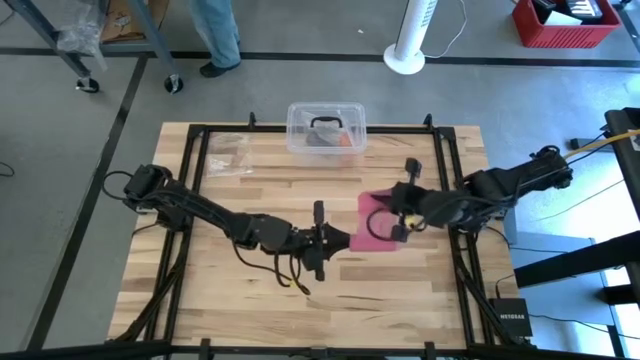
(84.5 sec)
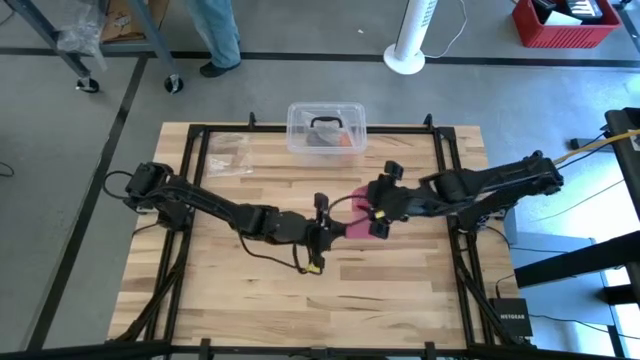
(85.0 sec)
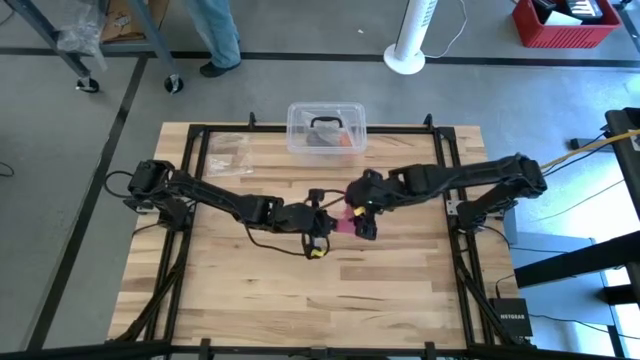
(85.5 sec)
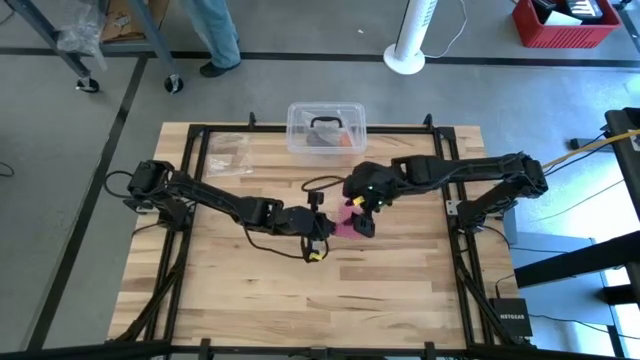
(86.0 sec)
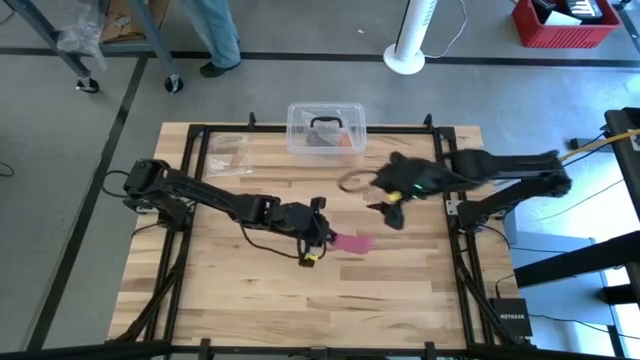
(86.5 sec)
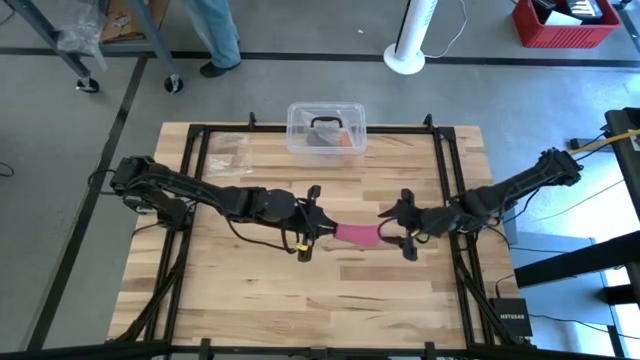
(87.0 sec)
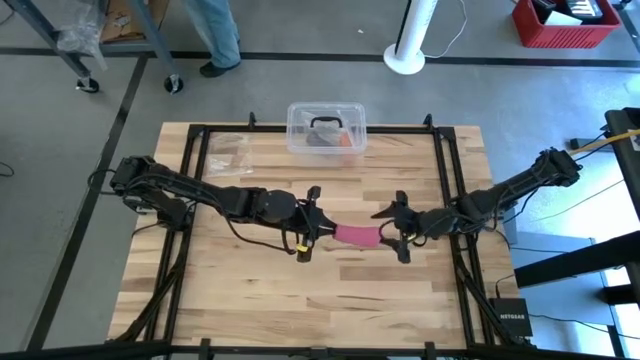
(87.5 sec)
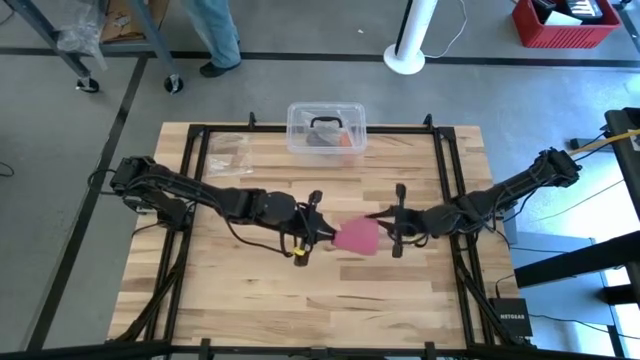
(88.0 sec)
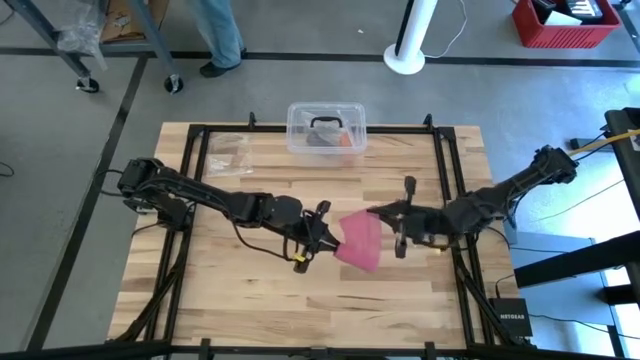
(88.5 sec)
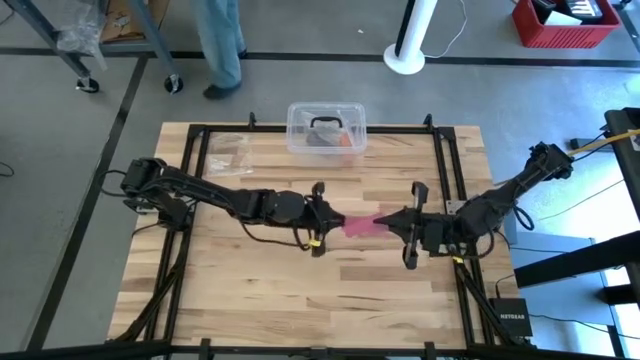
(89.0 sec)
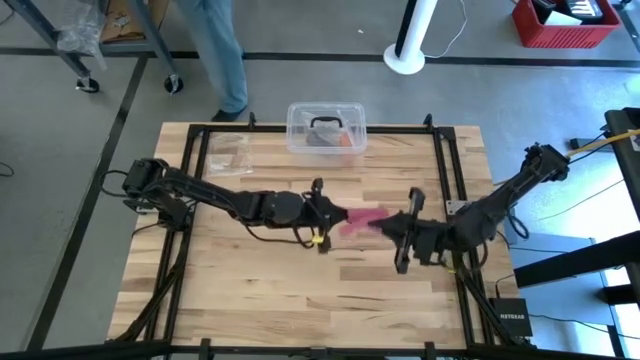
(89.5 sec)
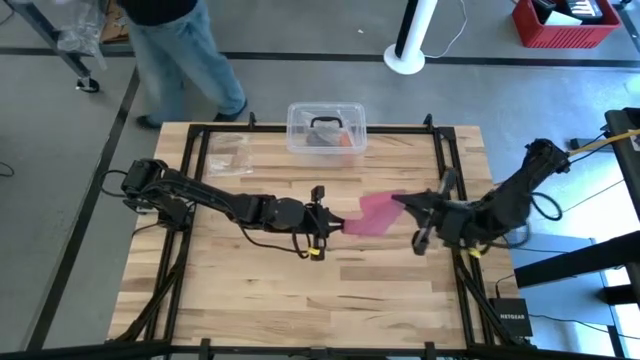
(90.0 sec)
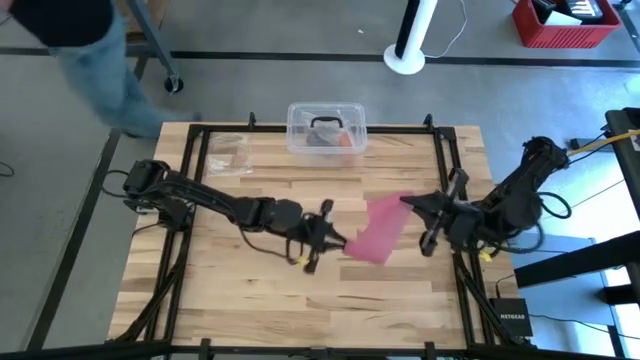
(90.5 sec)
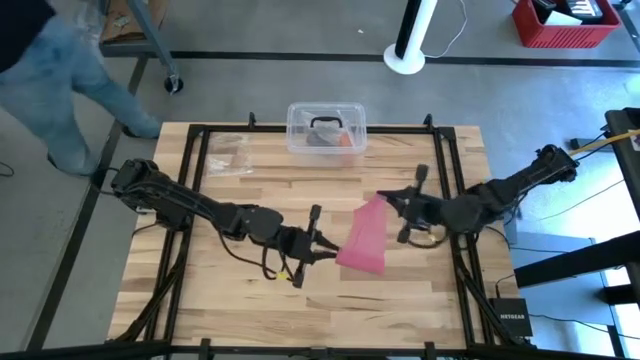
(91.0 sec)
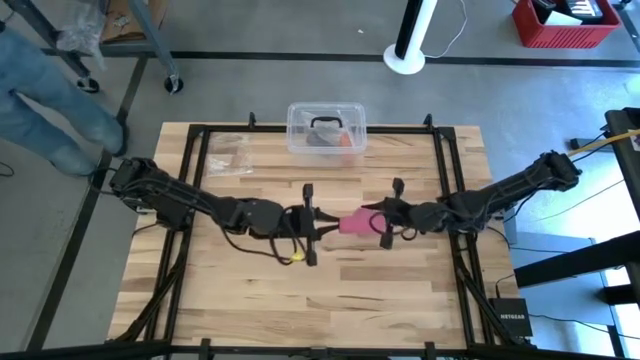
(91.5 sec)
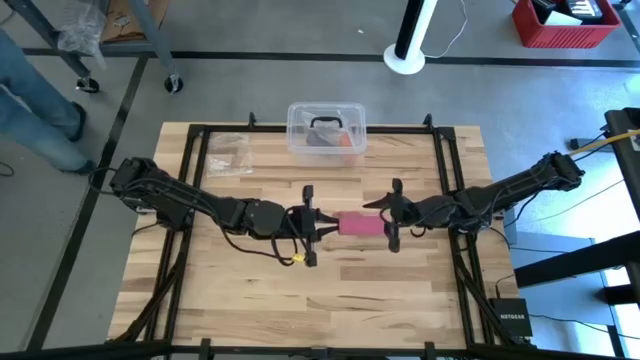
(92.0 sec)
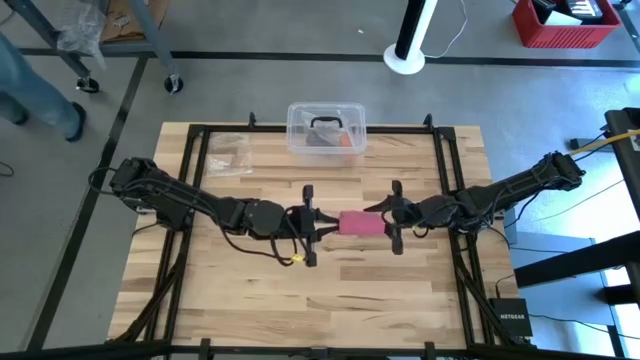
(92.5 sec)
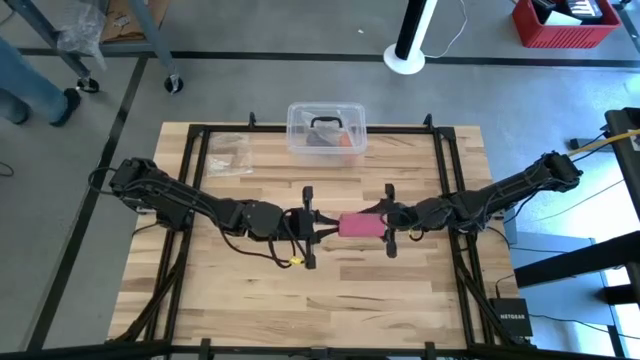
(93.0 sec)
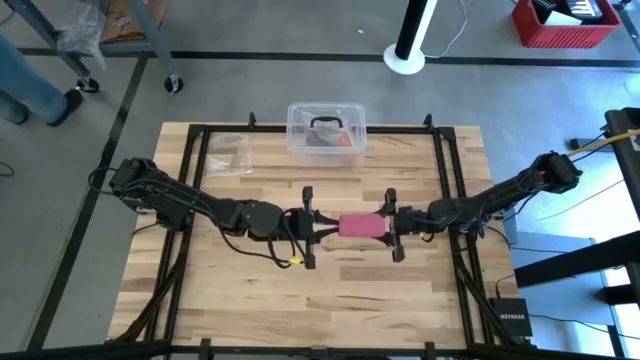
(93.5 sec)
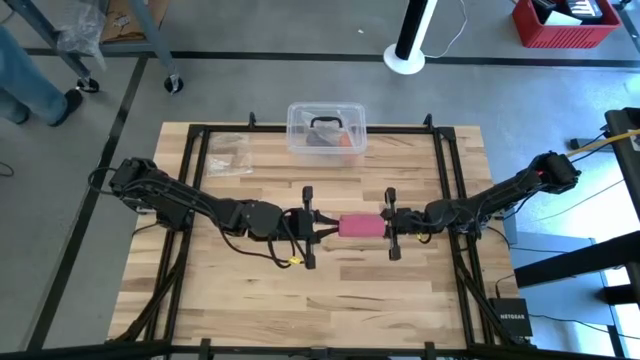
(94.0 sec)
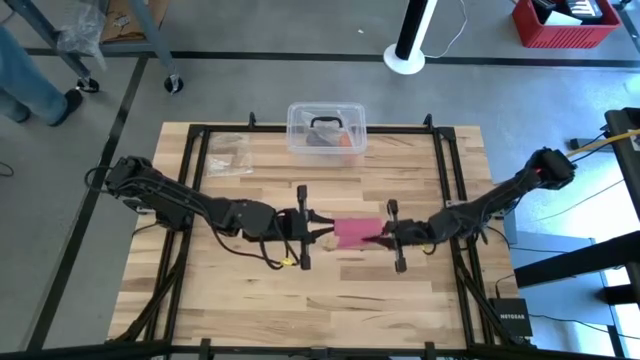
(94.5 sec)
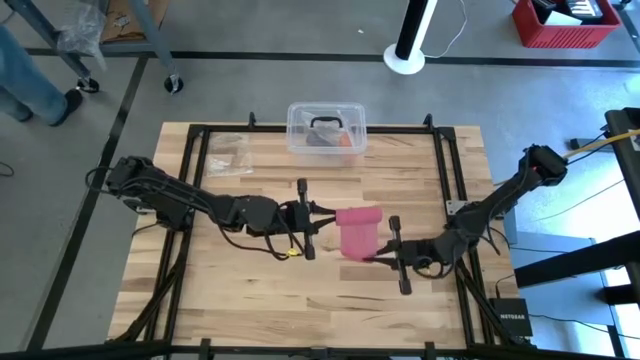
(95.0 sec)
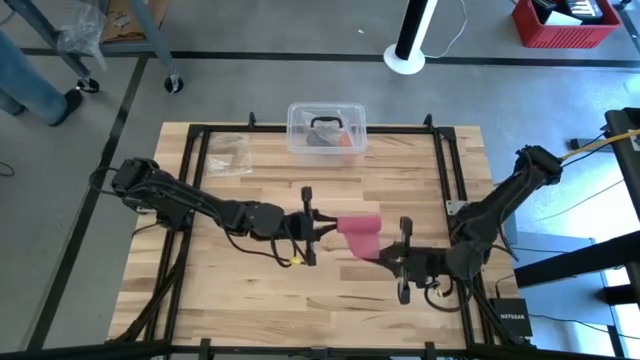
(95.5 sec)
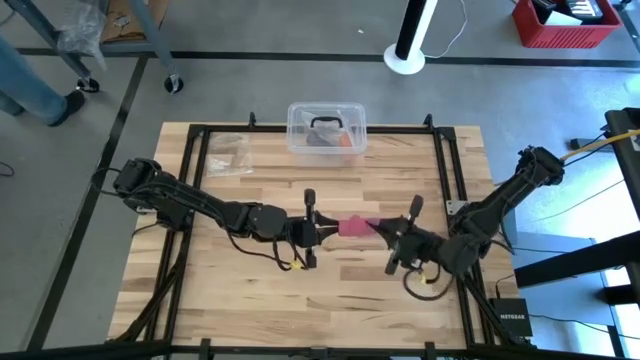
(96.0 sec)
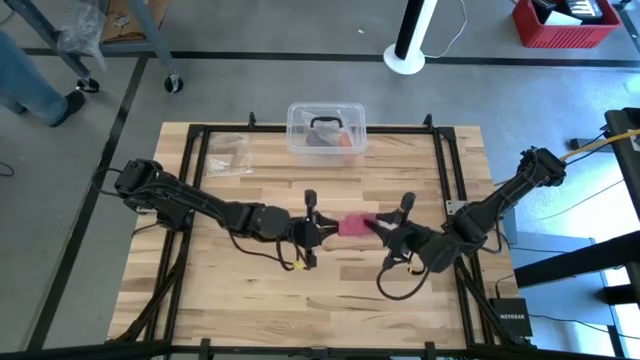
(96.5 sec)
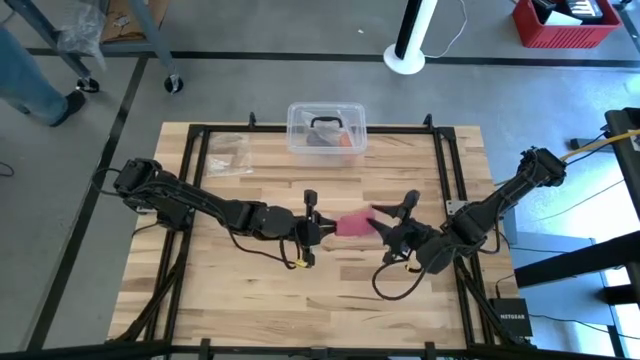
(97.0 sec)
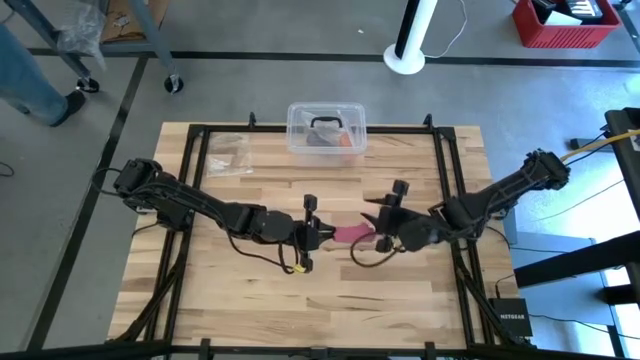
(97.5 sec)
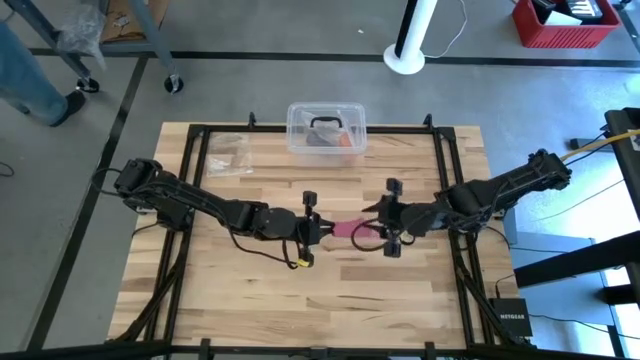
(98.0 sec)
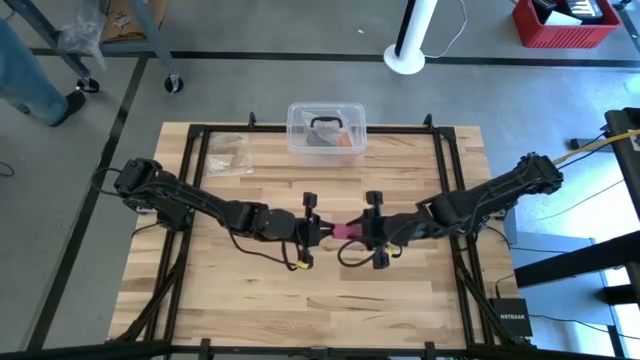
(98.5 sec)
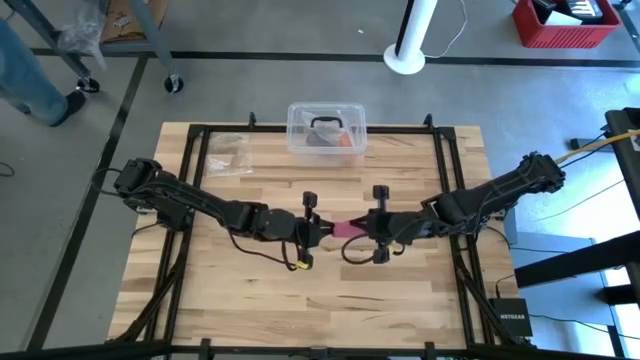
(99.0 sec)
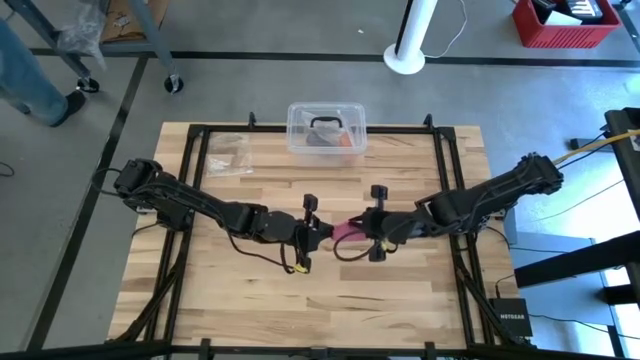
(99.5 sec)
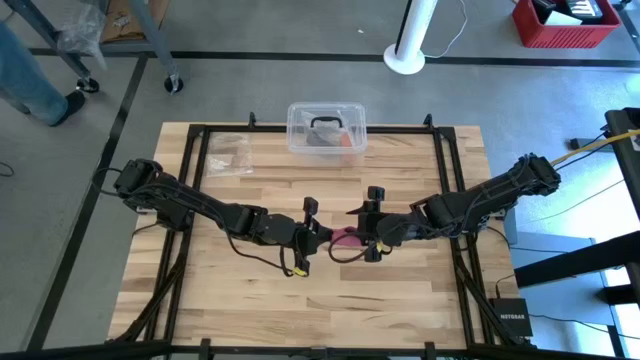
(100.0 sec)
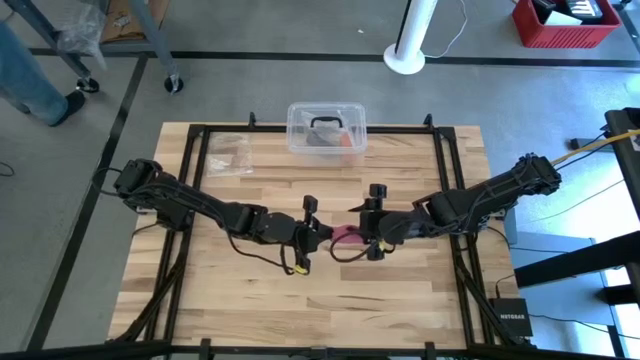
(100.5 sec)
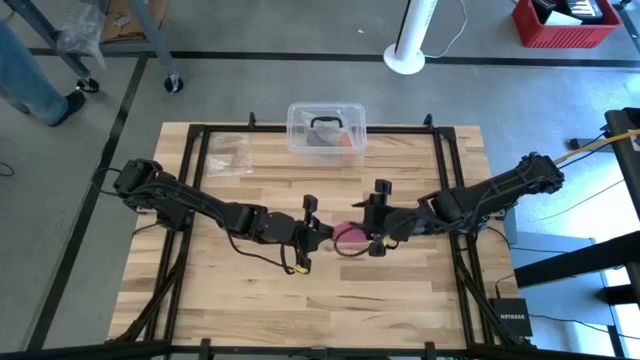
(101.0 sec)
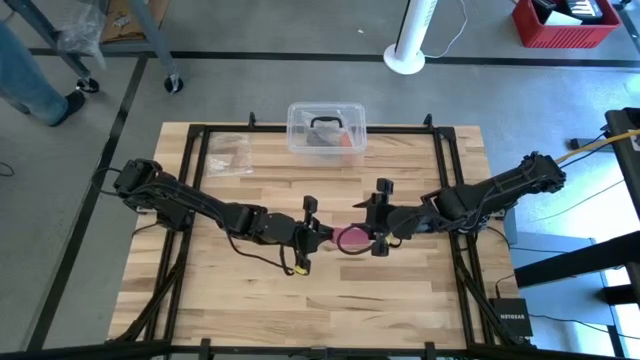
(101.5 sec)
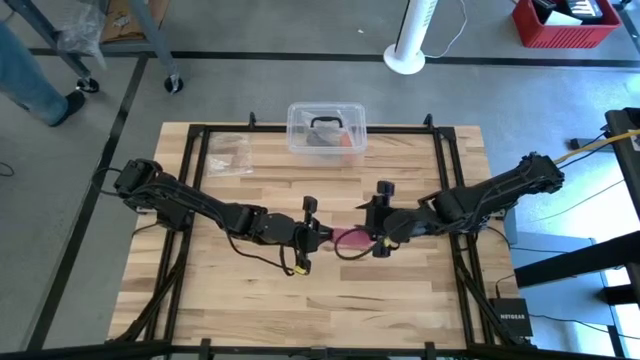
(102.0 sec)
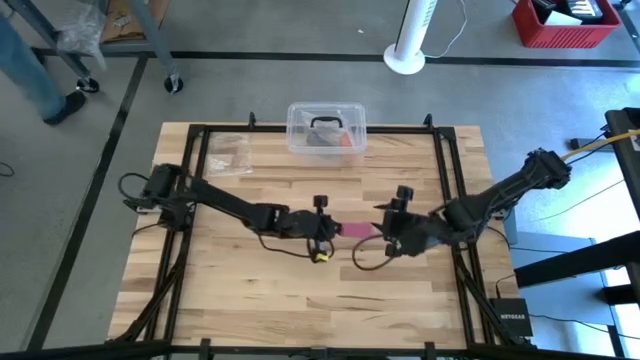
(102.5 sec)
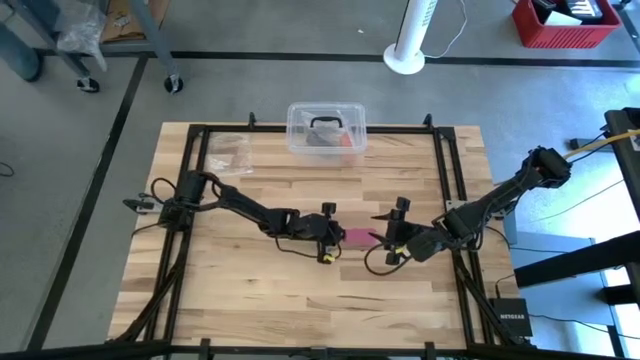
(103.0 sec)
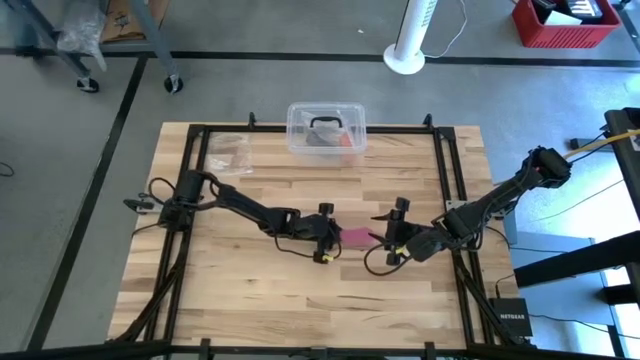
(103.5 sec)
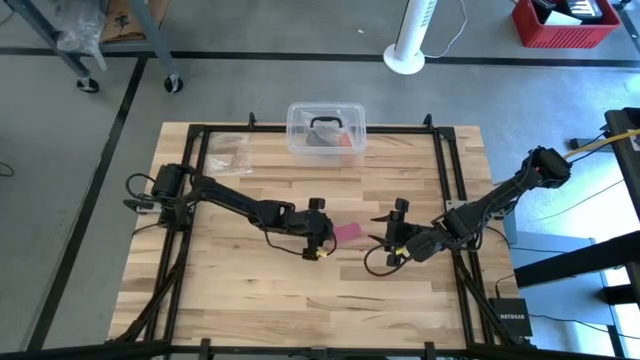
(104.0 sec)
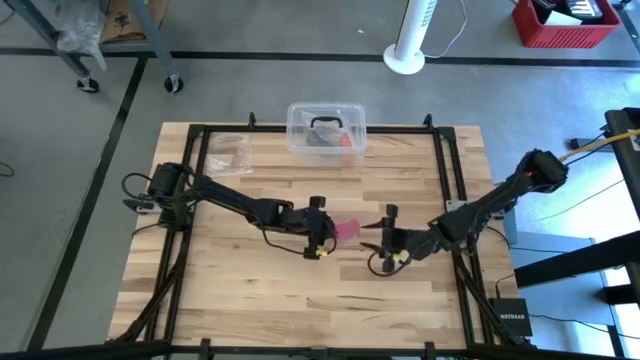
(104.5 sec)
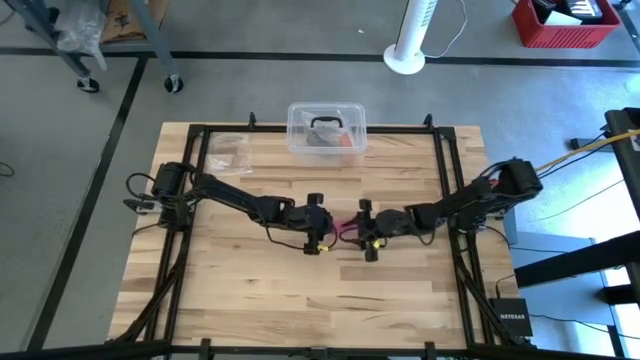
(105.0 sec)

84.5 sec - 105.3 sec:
Task: Roll bandage
Roll the pink bandage
